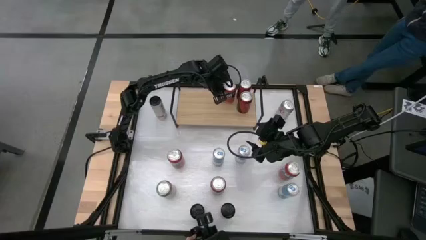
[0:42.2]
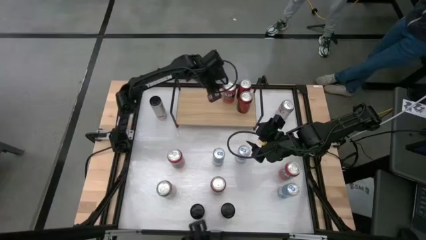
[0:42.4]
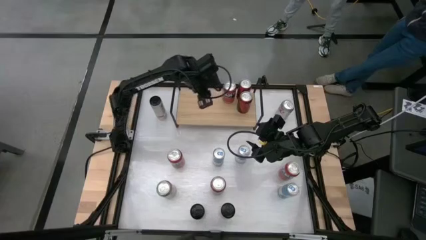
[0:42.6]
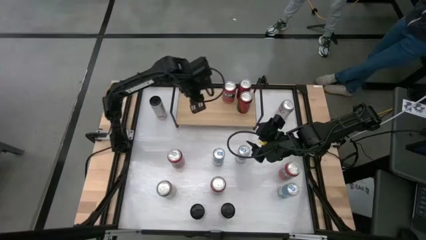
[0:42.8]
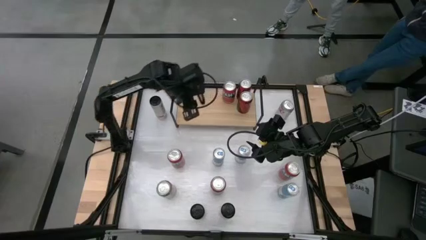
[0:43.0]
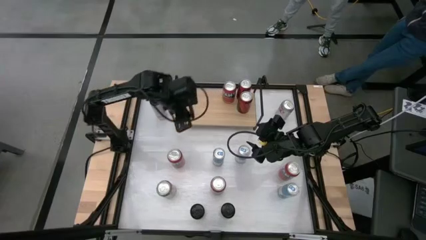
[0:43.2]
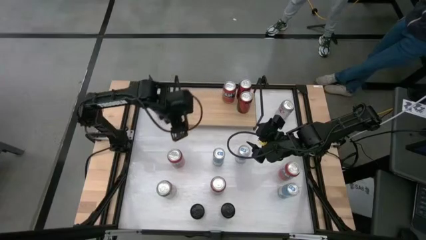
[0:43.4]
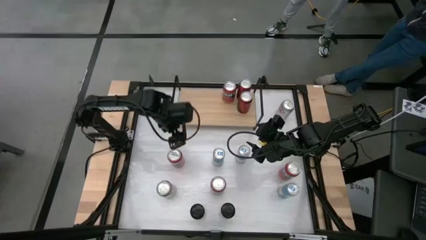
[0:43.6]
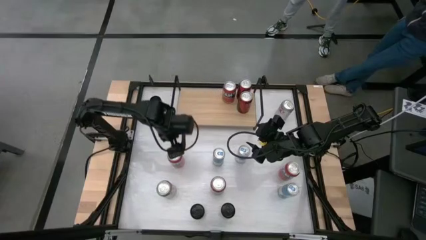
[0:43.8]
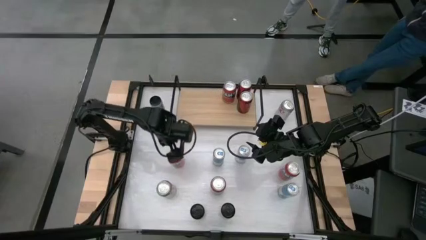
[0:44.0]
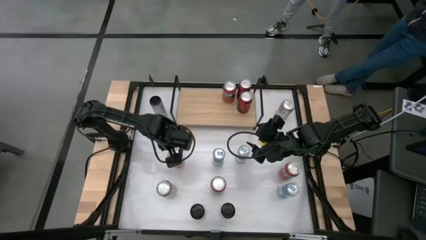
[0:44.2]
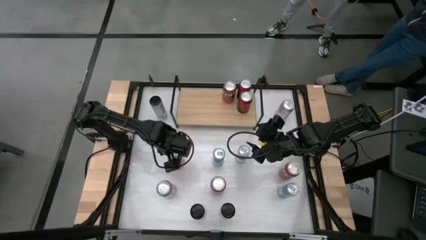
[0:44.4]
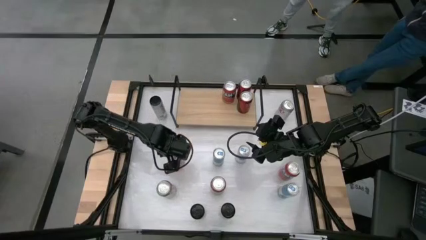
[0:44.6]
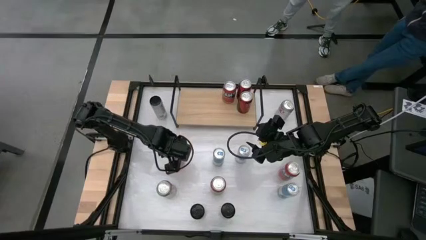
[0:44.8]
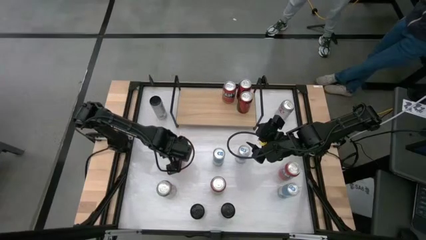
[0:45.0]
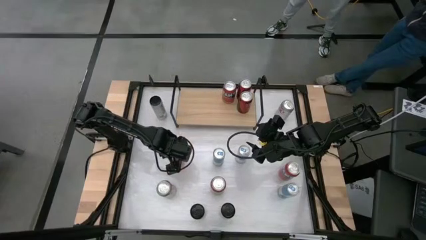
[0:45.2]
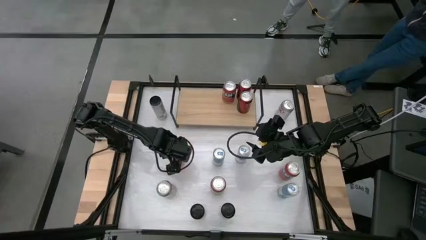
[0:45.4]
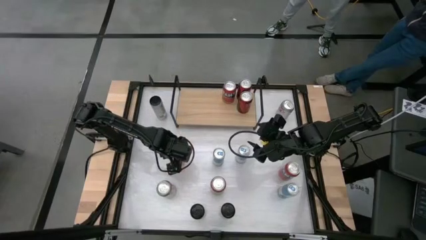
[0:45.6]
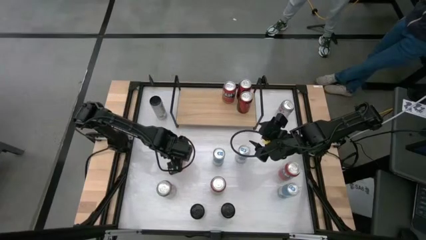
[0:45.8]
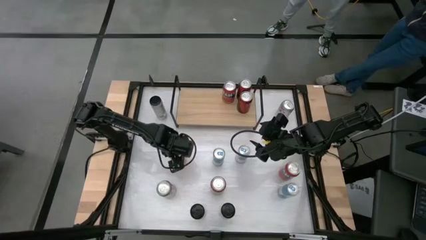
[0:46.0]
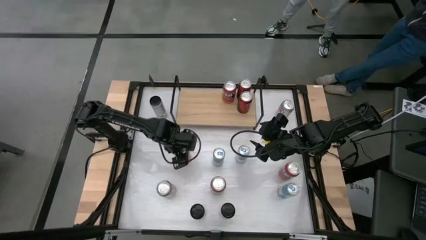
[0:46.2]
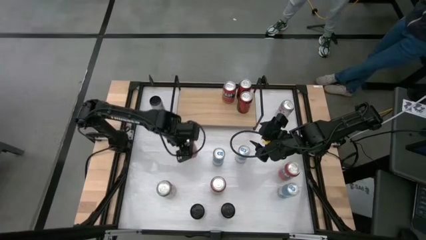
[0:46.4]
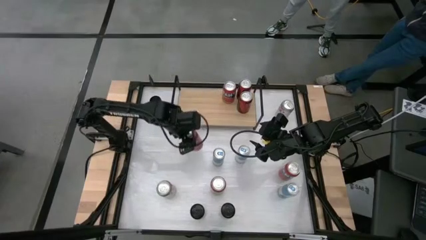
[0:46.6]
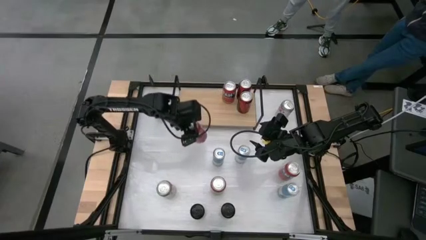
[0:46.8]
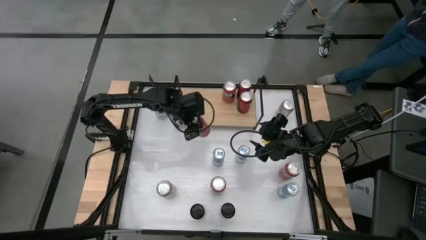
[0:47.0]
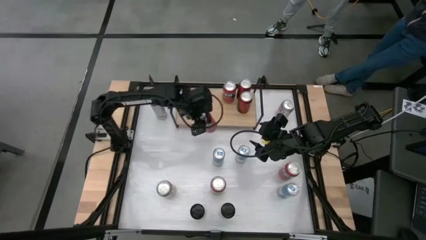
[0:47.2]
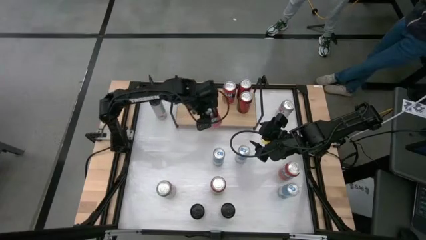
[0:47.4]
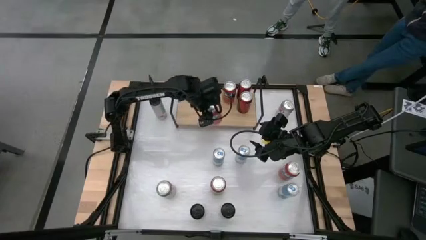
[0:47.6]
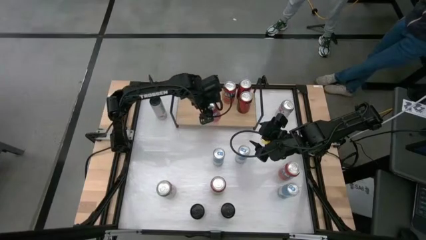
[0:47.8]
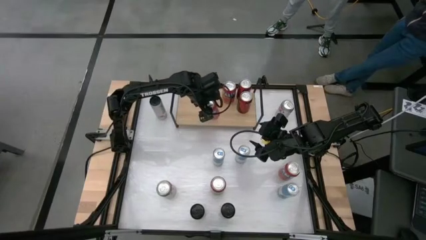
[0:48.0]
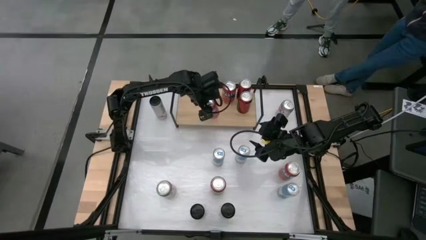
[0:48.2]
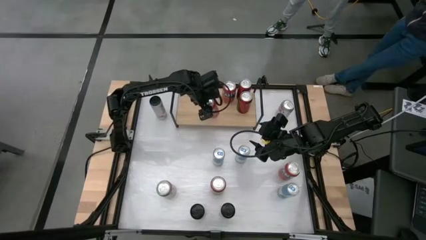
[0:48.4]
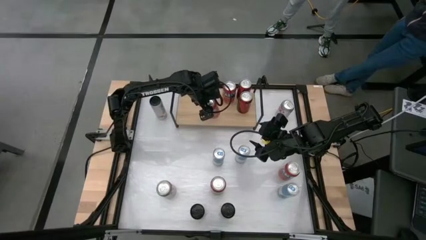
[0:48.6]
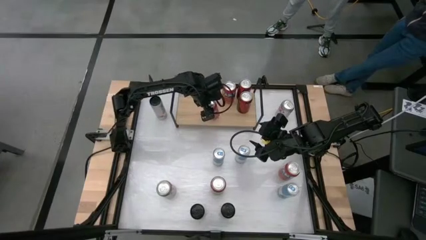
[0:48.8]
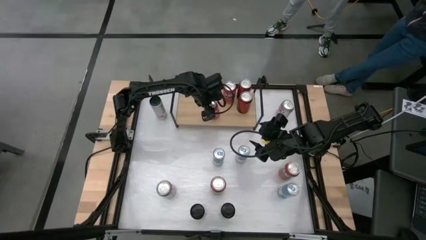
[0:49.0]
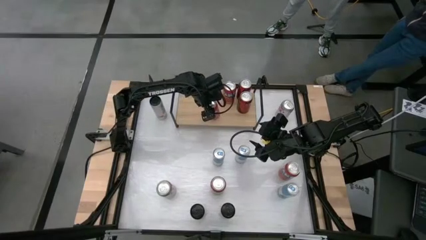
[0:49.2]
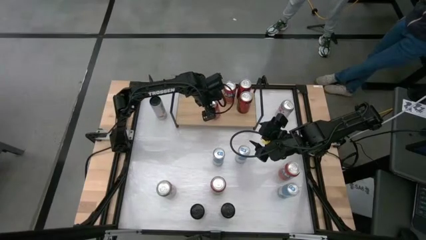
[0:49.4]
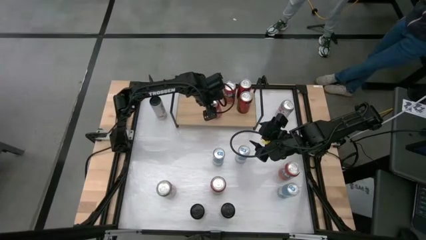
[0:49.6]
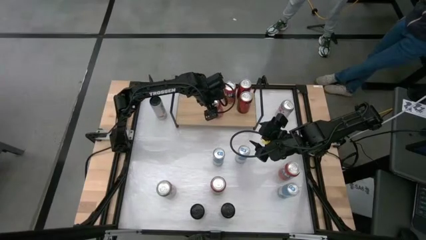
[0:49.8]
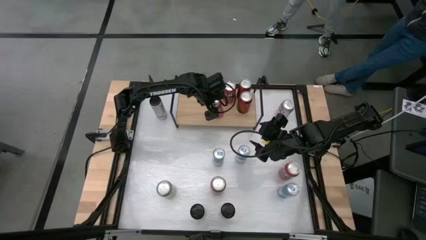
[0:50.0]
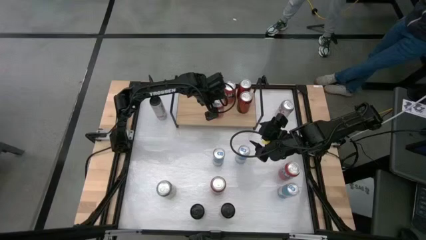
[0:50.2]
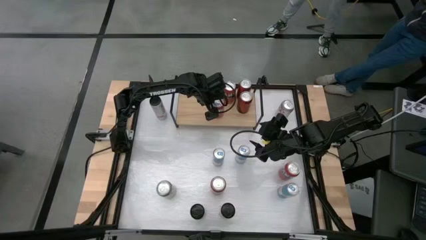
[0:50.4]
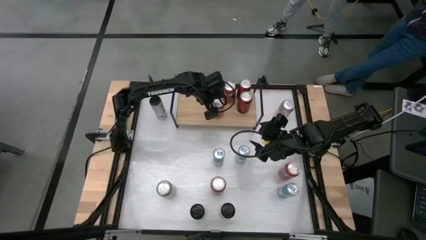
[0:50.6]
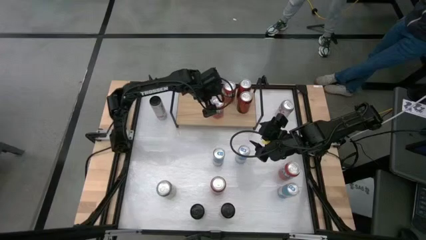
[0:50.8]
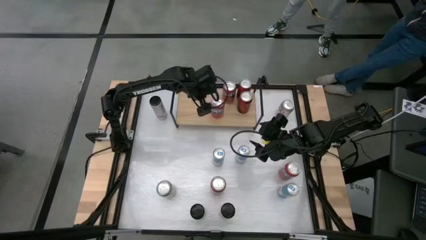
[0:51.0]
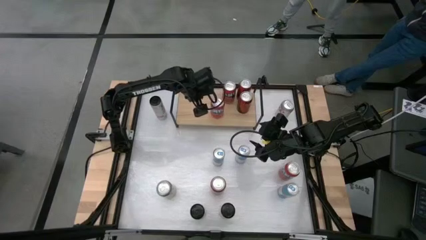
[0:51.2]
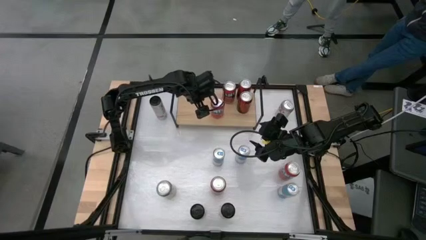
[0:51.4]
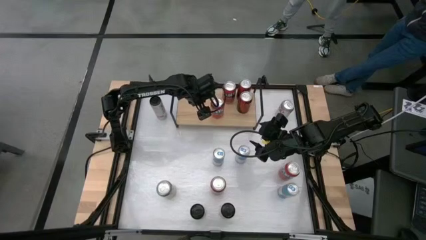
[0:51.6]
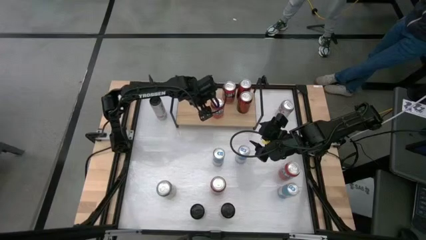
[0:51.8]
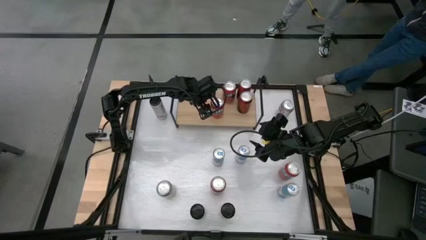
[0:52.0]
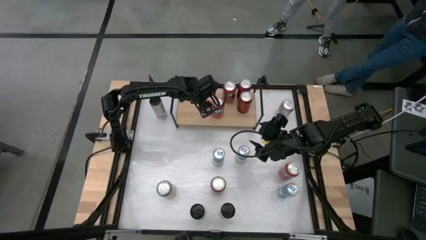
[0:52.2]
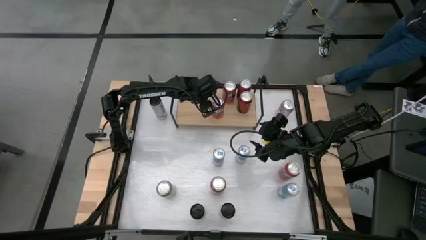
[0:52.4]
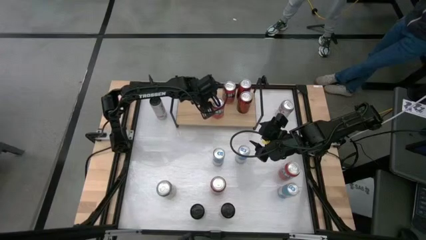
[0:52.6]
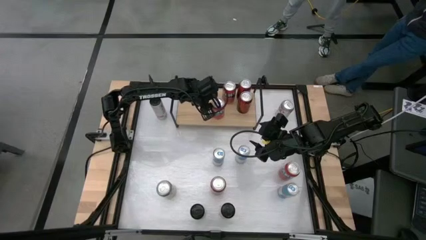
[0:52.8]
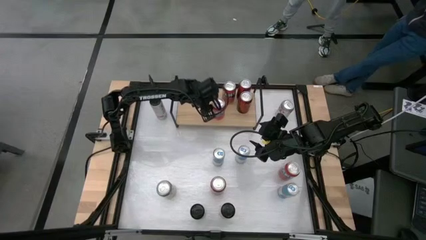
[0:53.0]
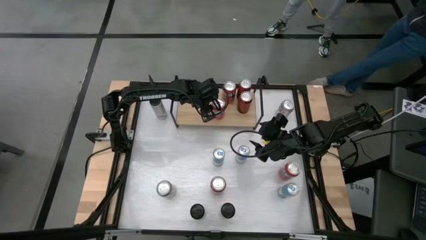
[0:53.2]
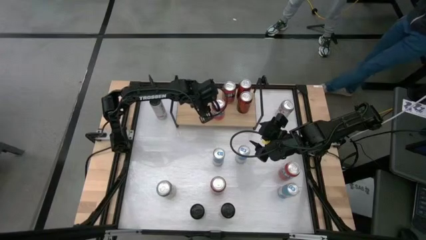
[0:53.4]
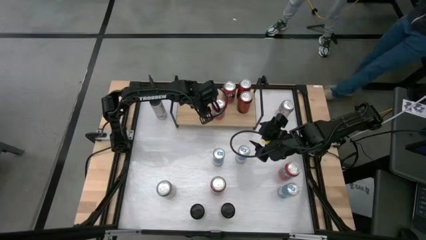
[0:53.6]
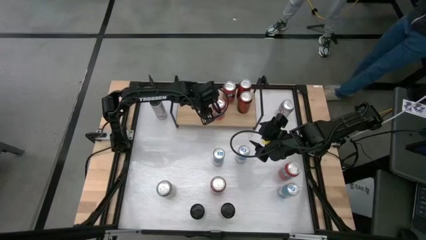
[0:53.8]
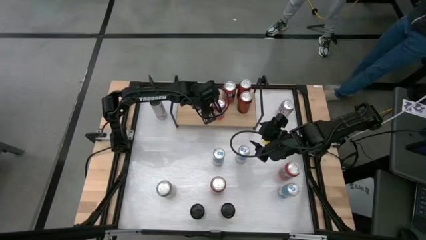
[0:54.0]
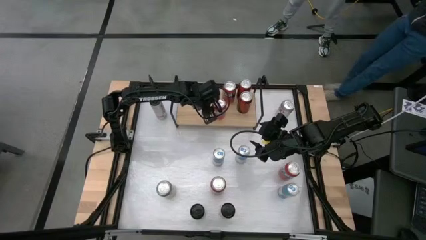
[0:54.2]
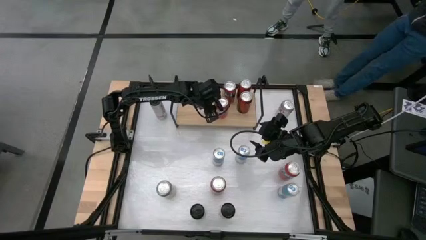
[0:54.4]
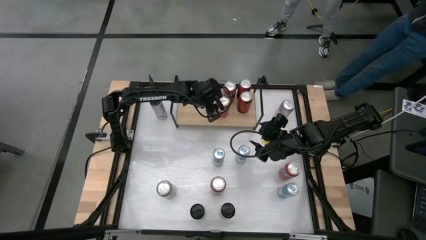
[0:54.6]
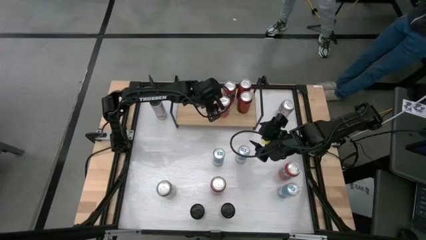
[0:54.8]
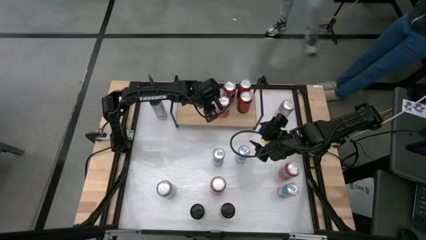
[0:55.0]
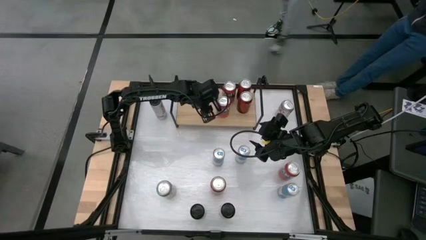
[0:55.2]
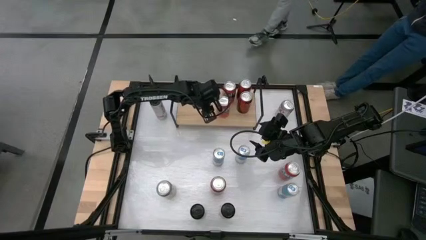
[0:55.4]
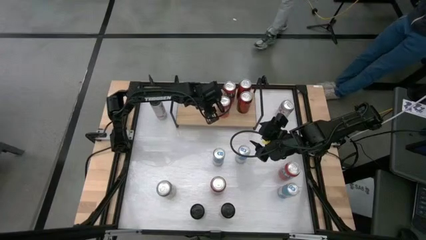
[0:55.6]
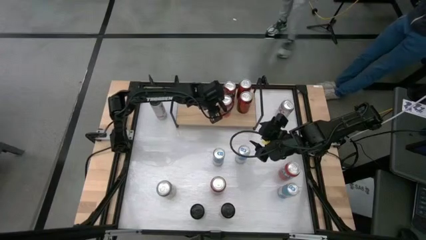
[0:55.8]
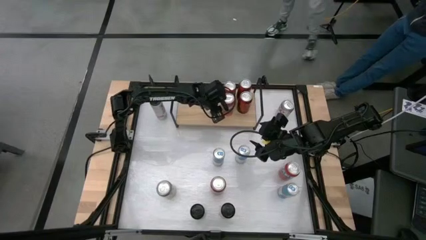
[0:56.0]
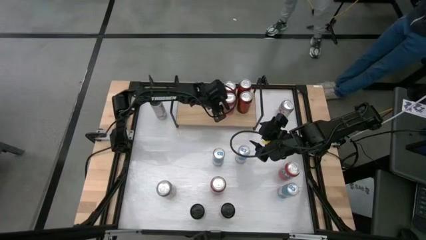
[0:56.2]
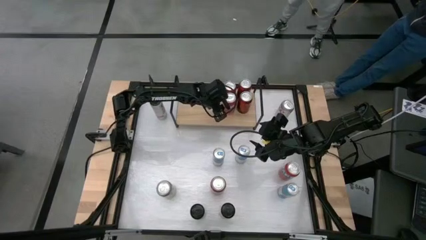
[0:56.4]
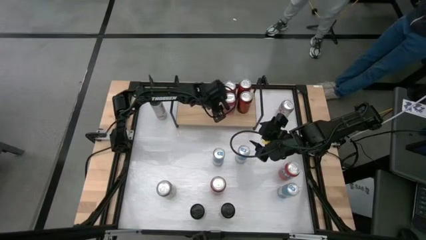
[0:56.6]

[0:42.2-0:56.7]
Task: Place canned beverage on shelf
Put the pink soda can on the shelf aligned with other pink soda can
